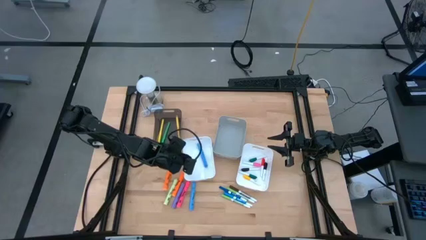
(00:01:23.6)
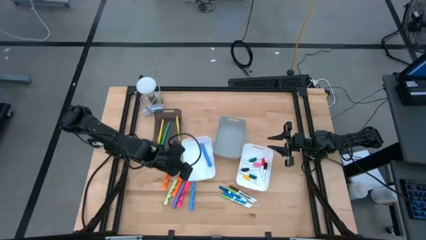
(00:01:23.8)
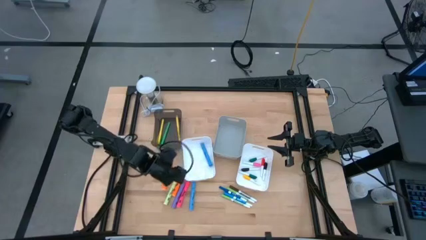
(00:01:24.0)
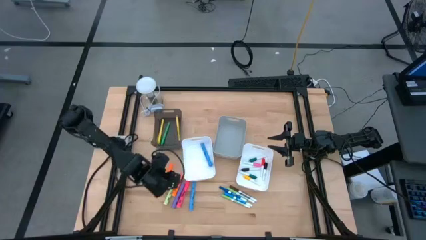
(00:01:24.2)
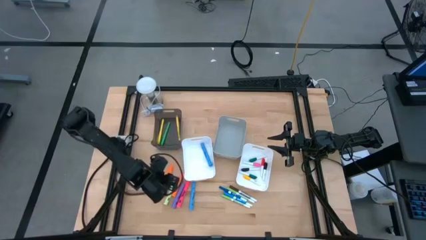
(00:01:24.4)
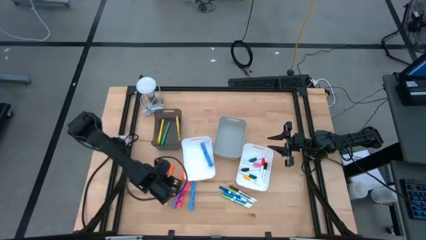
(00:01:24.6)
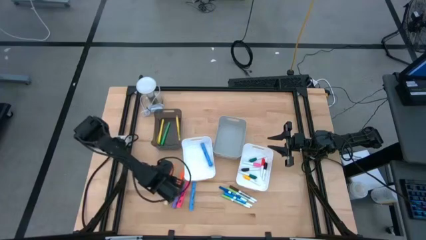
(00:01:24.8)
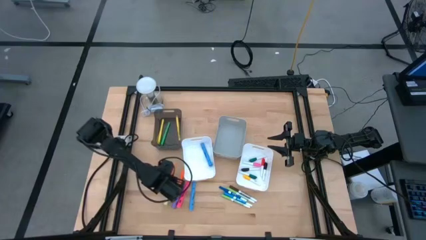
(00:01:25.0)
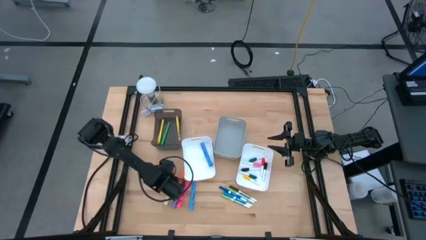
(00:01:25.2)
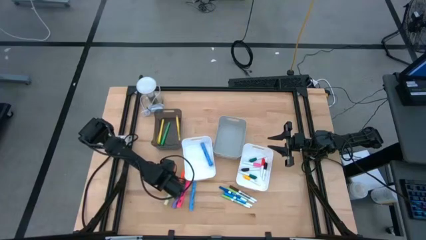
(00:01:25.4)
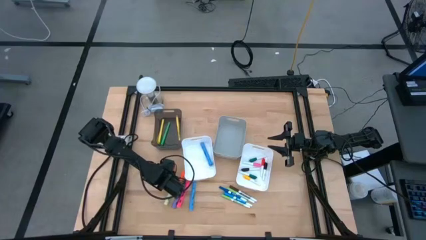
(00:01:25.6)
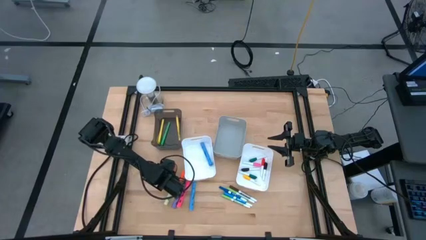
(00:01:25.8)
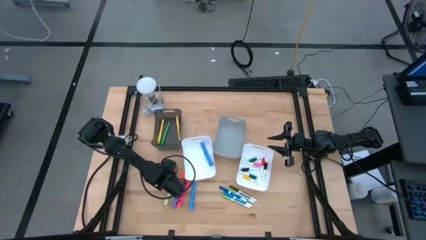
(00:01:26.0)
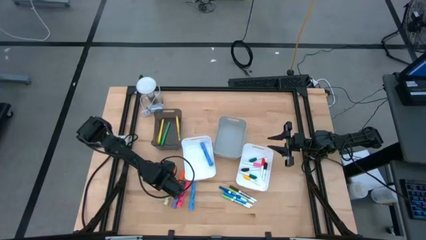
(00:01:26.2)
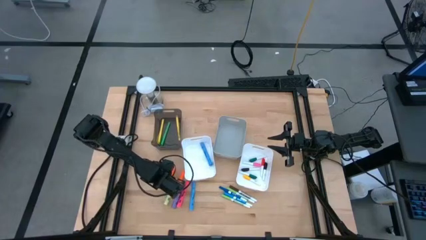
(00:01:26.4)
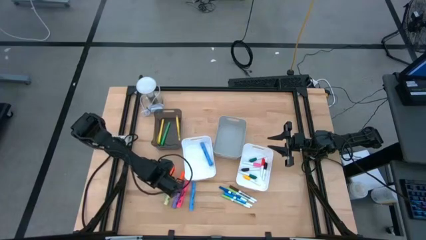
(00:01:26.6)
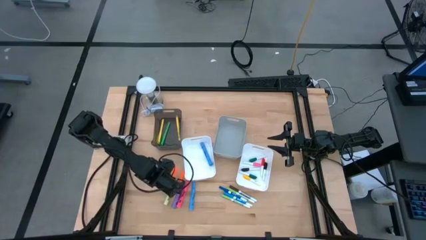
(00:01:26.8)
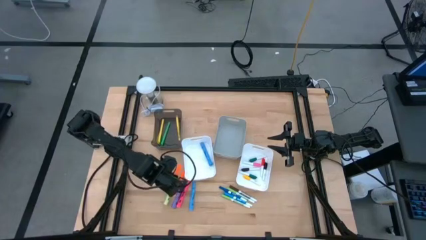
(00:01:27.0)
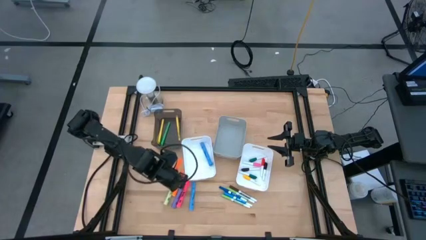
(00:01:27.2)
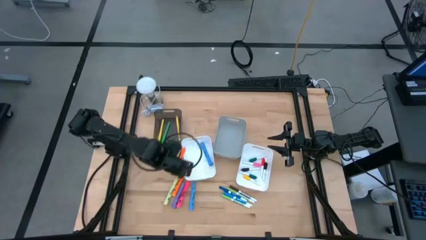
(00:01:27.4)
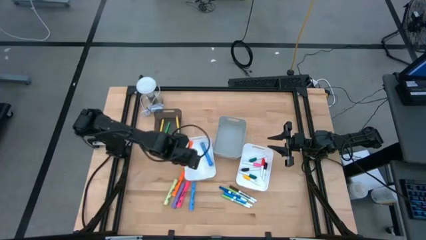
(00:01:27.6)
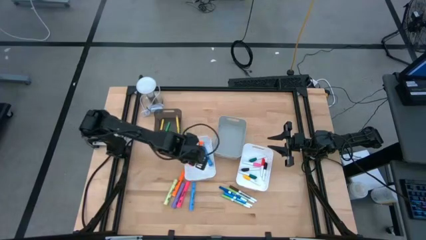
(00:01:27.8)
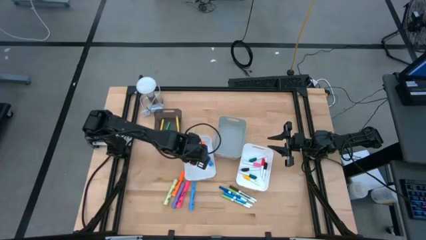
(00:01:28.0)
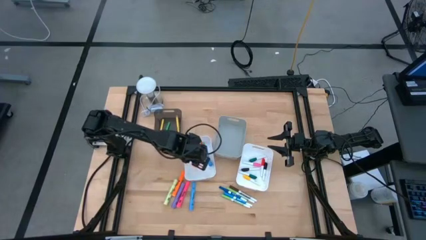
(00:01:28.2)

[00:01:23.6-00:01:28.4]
Task: Pick & Place Markers
Put the left orange highlighter into the left white bin

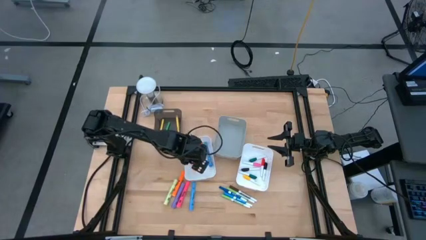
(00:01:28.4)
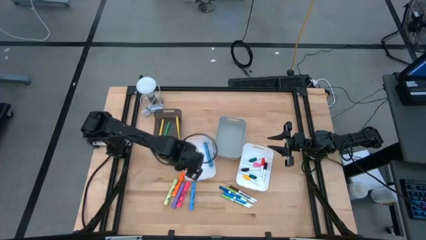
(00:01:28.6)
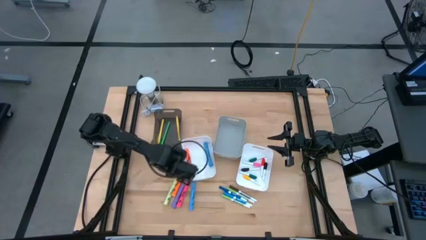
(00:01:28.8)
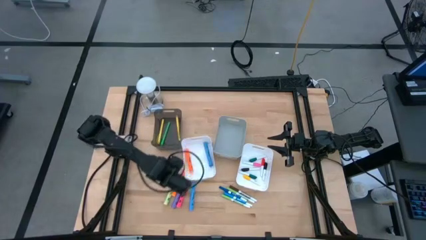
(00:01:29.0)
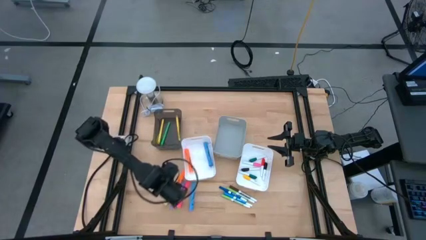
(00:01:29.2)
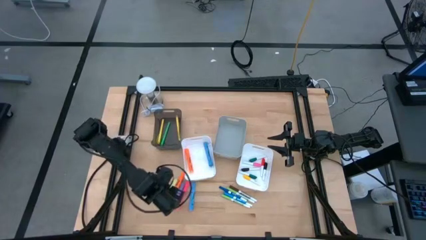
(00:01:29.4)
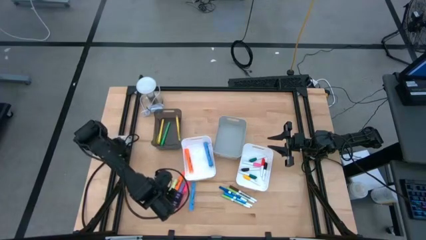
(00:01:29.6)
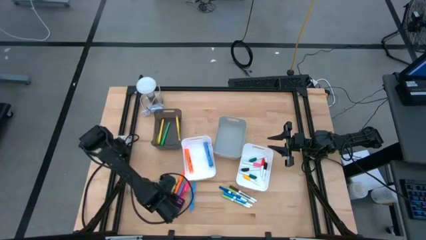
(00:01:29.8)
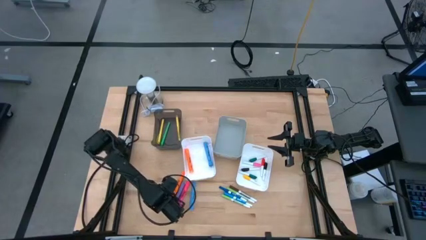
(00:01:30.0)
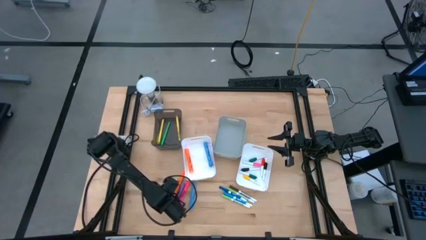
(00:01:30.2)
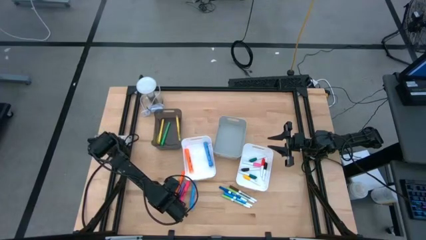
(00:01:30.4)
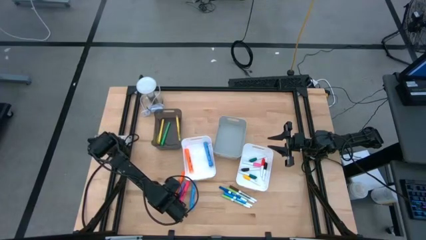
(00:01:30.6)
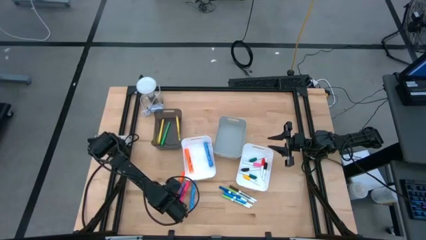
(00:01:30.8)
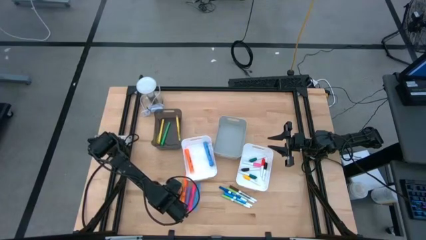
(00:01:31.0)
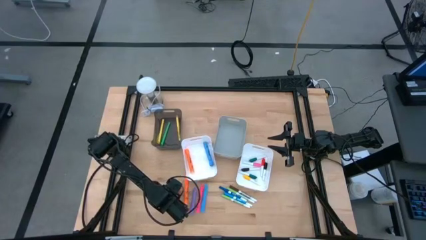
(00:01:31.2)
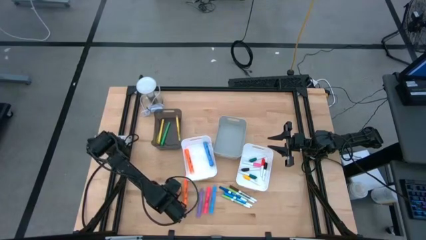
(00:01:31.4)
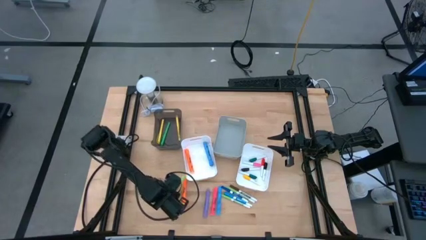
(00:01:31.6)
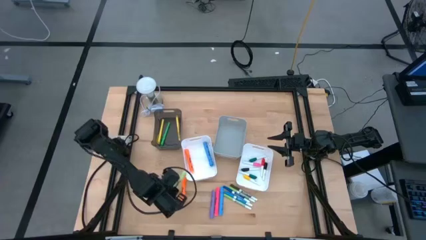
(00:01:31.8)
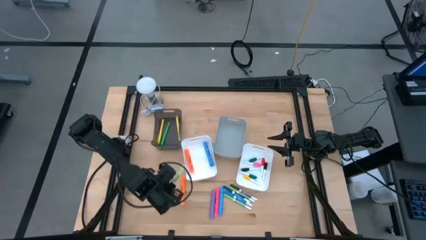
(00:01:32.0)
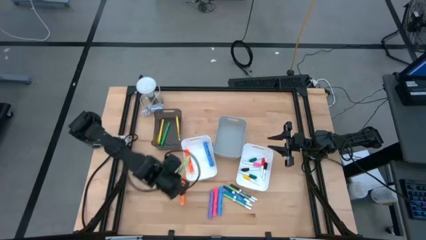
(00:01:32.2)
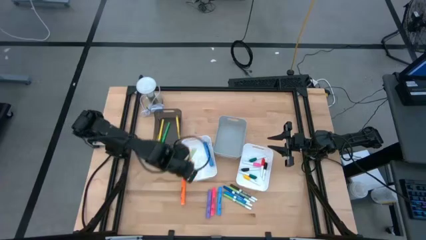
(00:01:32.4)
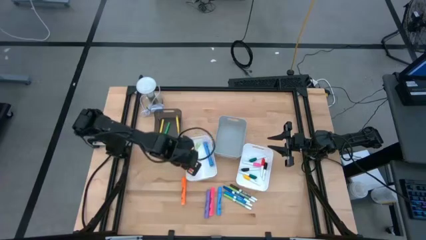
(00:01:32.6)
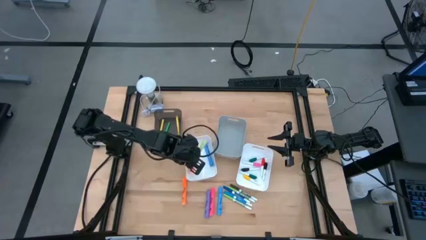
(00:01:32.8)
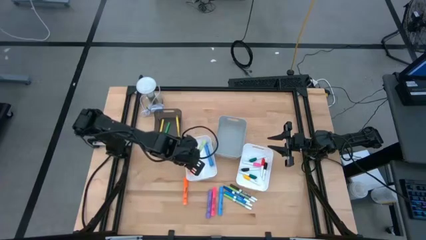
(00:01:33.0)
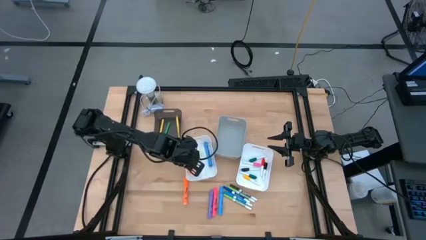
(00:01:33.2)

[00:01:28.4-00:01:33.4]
Put the green highlighter into the left white bin

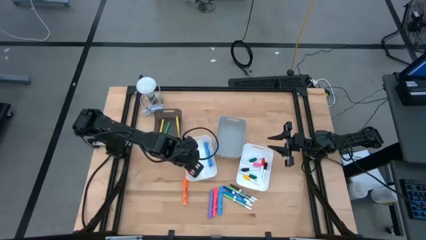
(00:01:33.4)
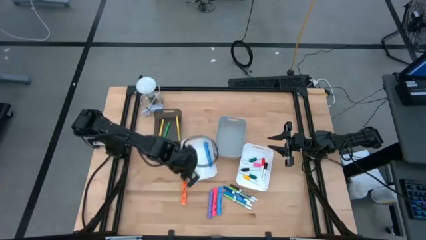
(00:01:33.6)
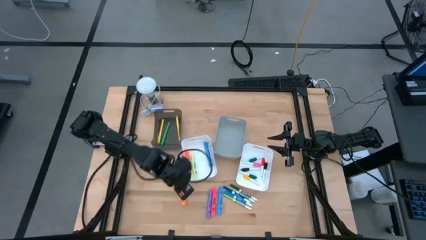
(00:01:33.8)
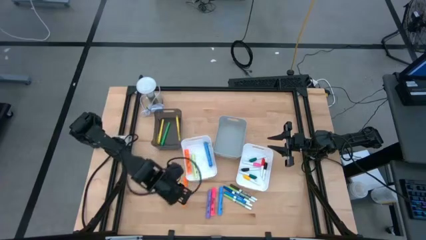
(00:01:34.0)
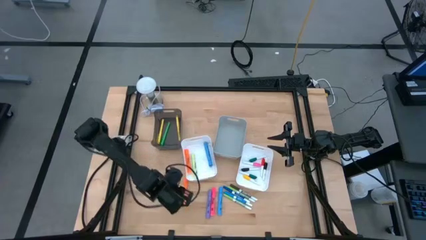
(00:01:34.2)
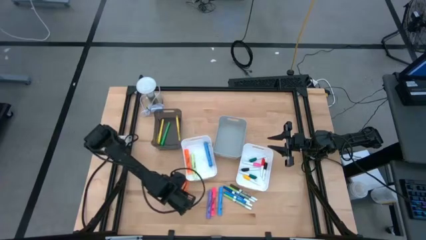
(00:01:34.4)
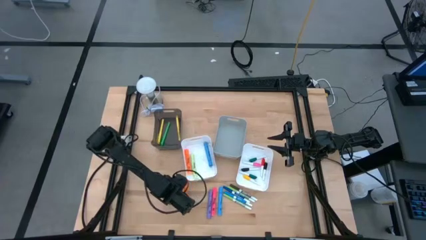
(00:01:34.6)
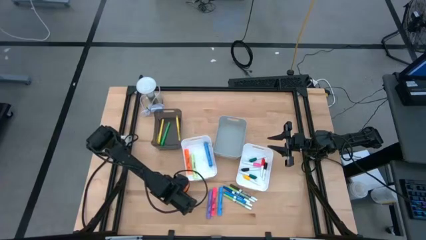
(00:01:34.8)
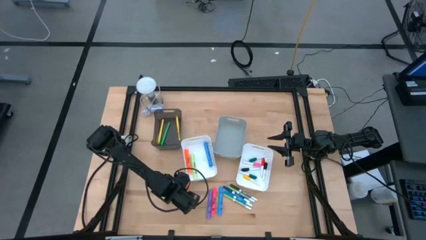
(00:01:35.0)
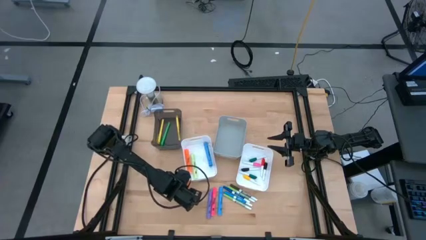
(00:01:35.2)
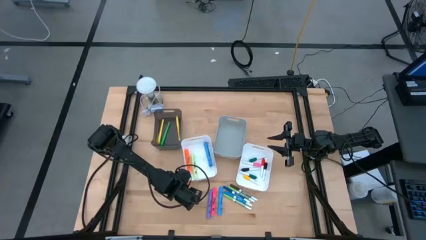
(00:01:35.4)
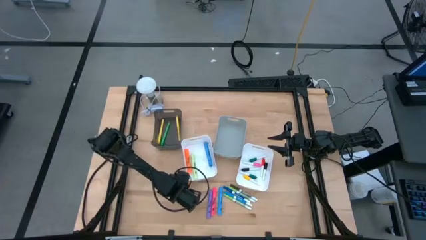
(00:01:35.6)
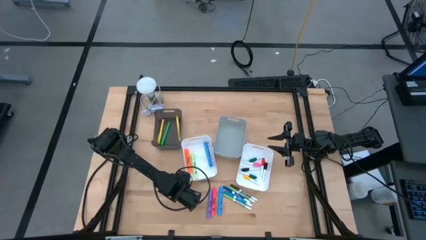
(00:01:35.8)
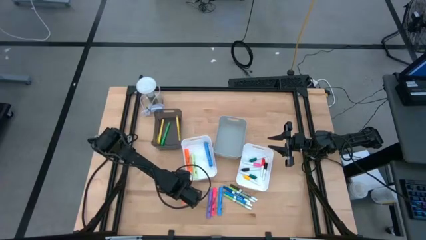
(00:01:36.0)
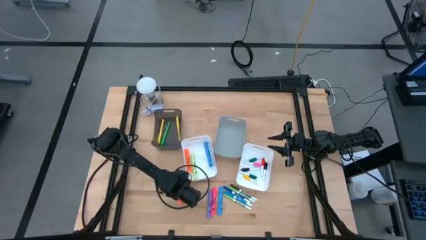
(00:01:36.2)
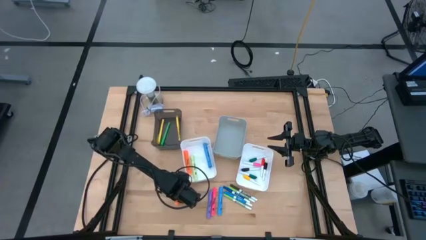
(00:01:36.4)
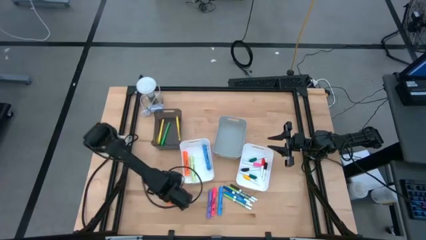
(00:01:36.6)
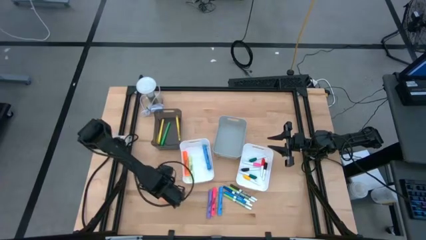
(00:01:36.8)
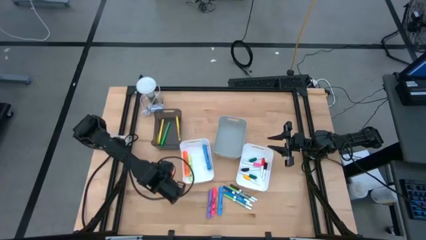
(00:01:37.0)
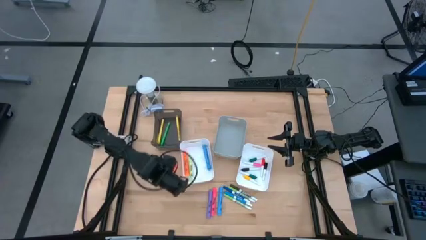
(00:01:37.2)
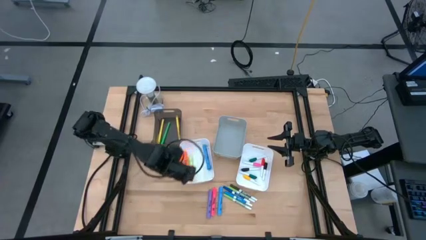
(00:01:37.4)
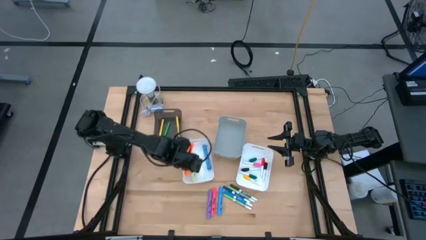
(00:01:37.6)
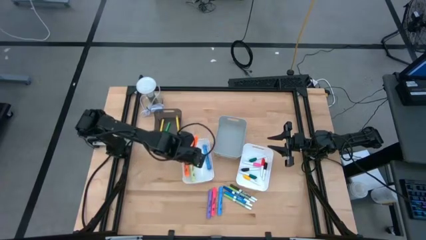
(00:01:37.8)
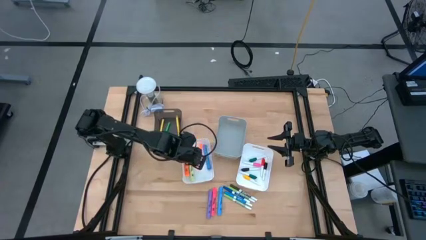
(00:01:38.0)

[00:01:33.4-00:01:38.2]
Put the orange highlighter into the left white bin
